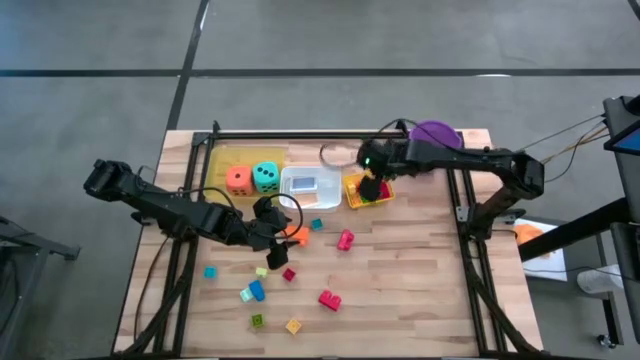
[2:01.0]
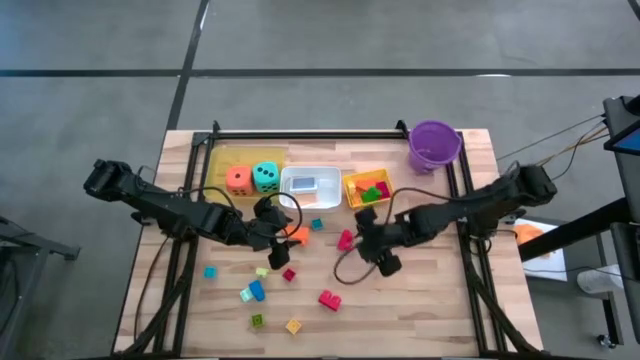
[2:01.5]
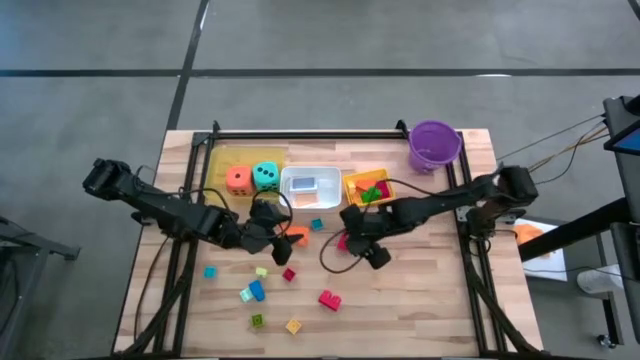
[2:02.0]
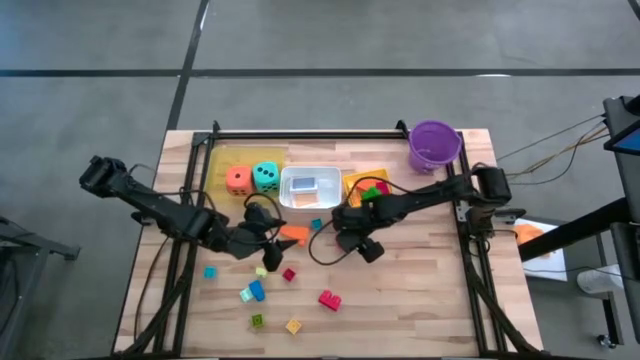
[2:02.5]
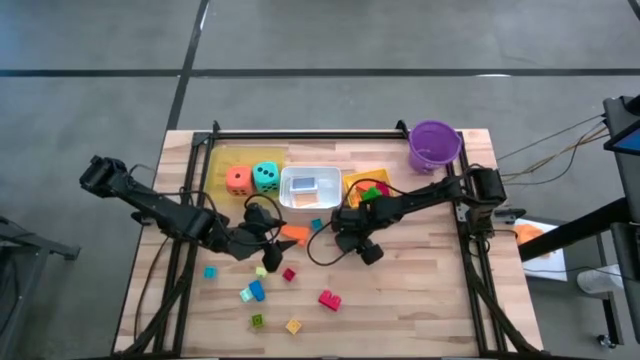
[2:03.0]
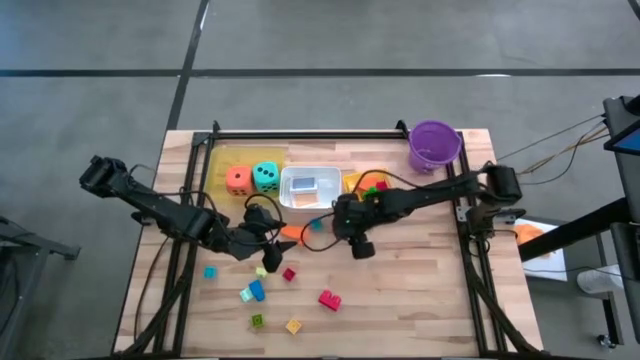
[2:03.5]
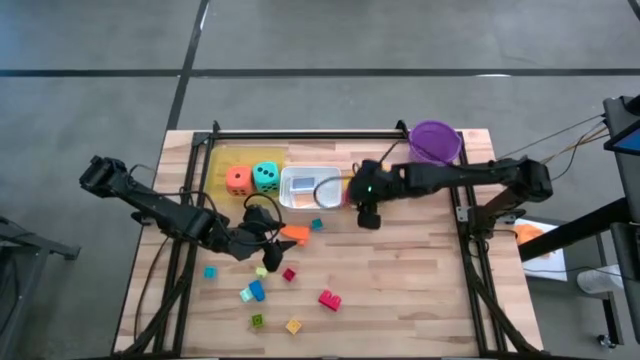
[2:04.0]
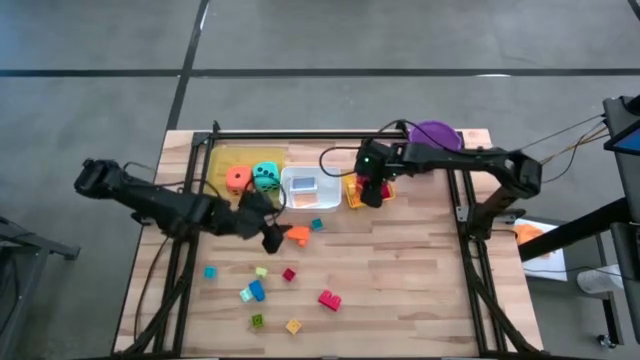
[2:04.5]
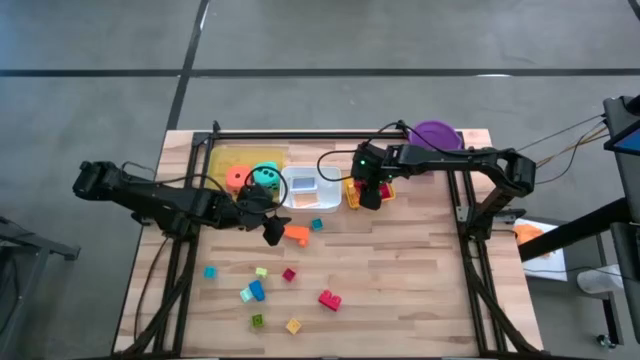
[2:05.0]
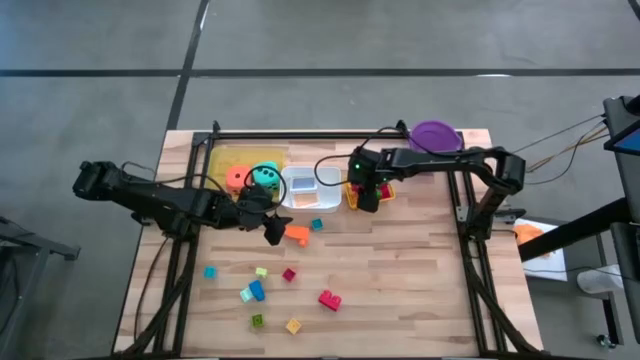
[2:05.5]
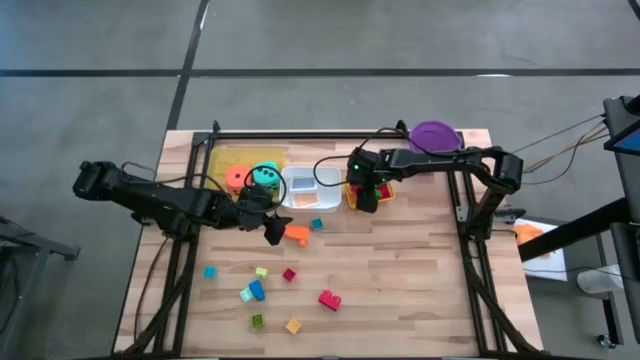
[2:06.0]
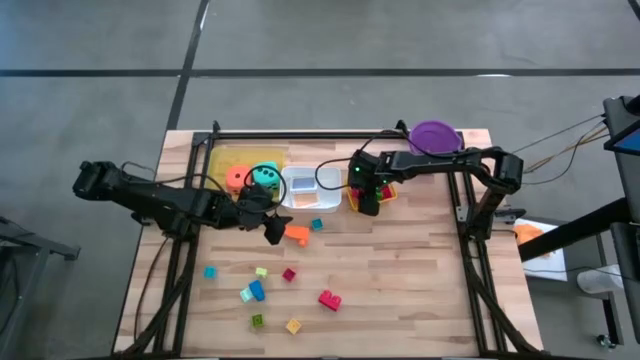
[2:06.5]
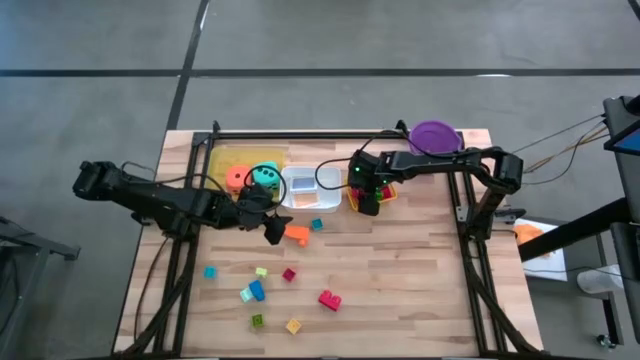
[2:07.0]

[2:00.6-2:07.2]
Task: Pick & Place Toys
Put the red game piece into the yellow bin

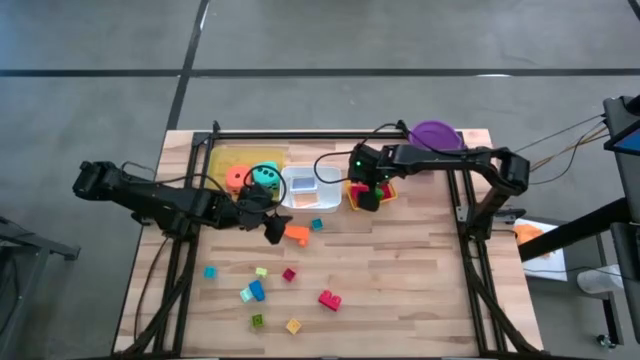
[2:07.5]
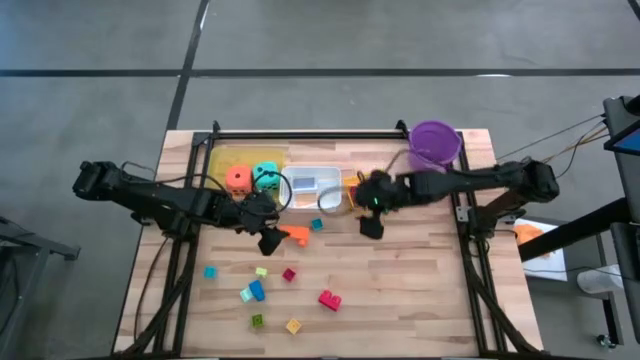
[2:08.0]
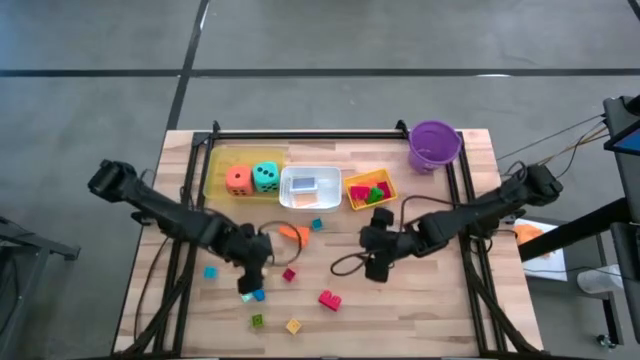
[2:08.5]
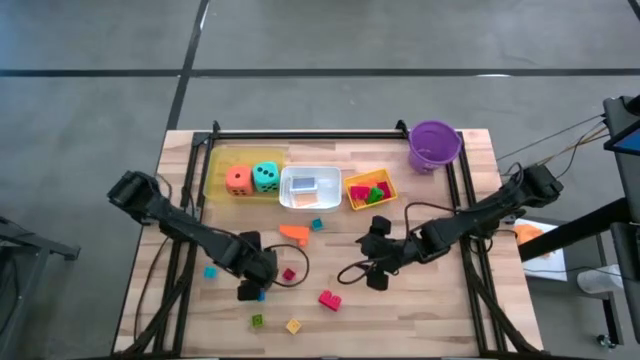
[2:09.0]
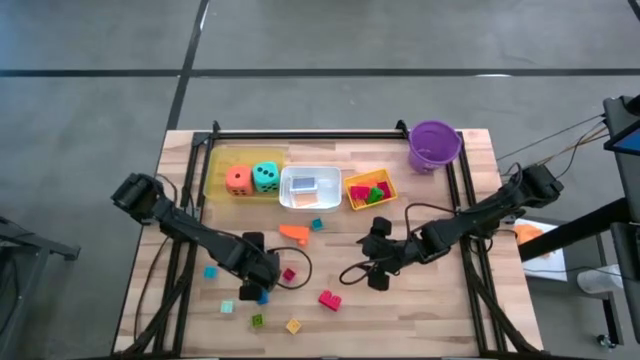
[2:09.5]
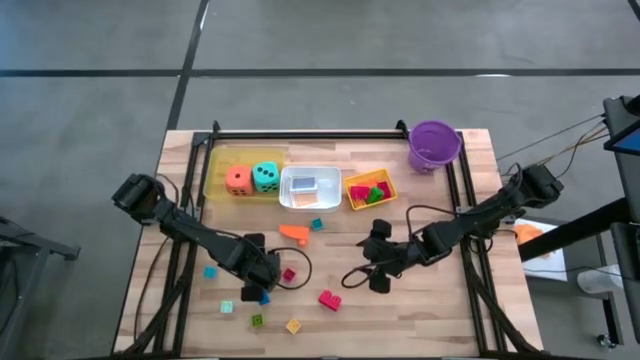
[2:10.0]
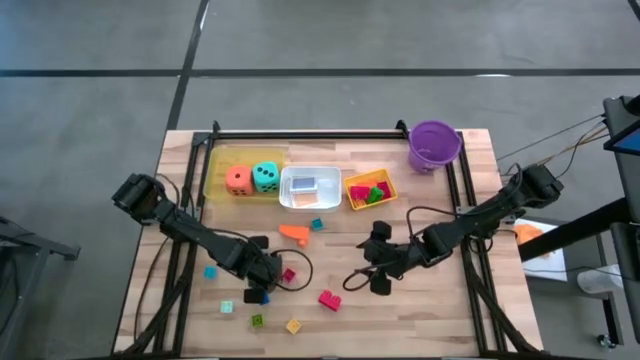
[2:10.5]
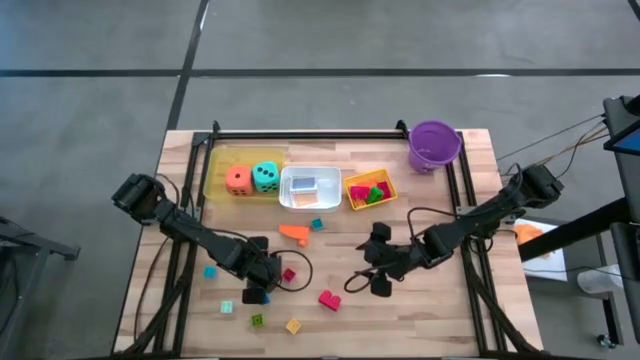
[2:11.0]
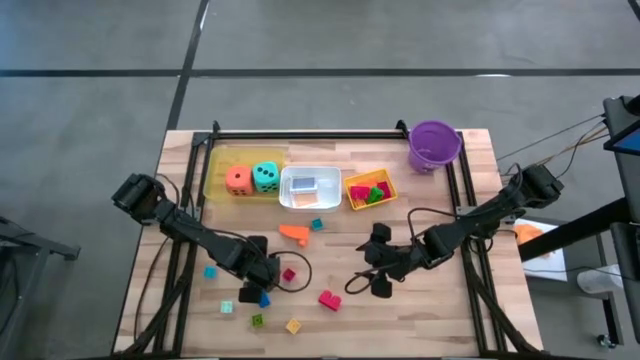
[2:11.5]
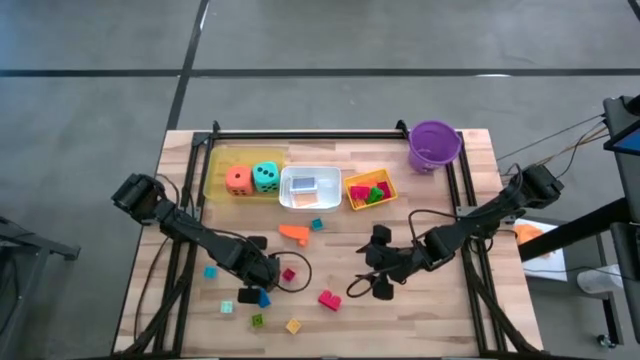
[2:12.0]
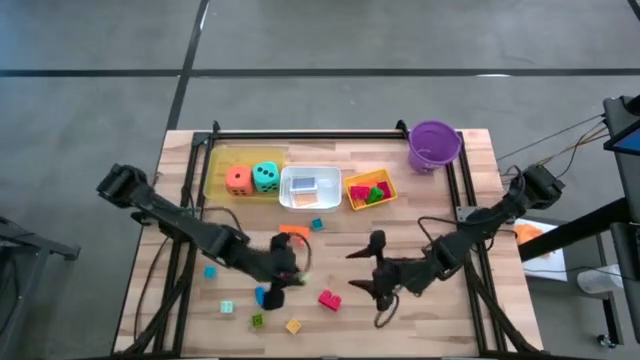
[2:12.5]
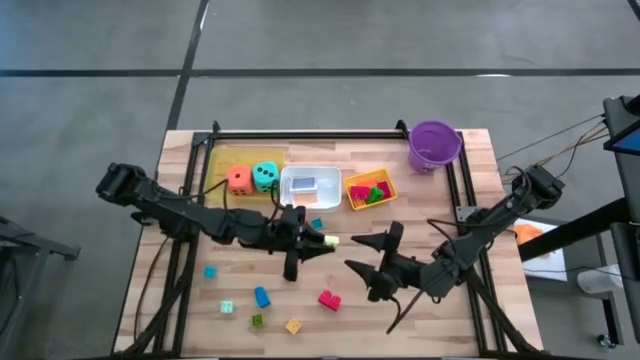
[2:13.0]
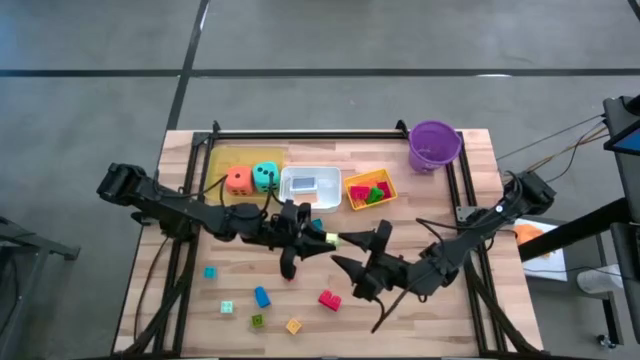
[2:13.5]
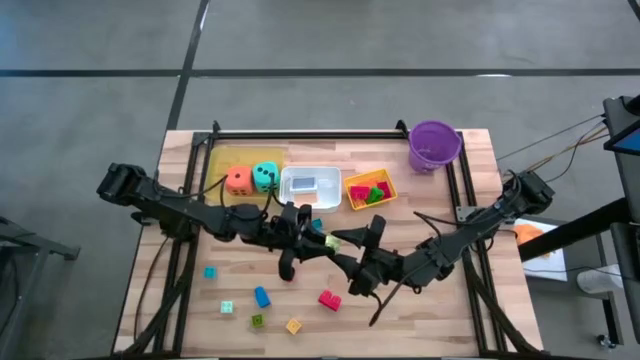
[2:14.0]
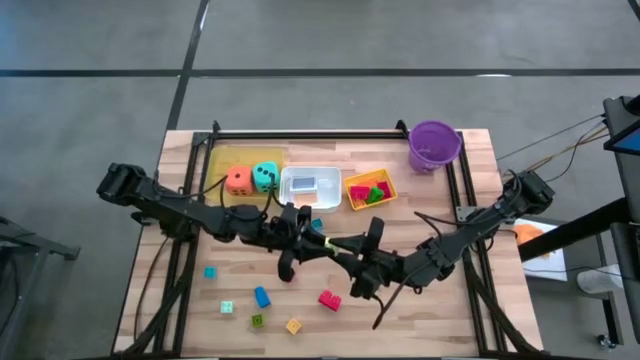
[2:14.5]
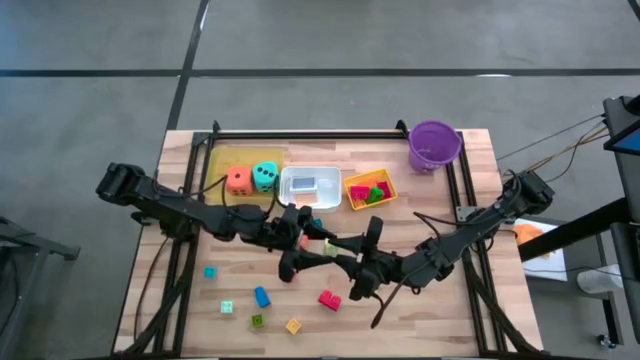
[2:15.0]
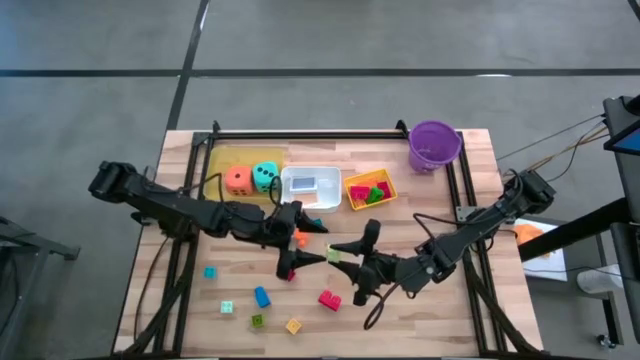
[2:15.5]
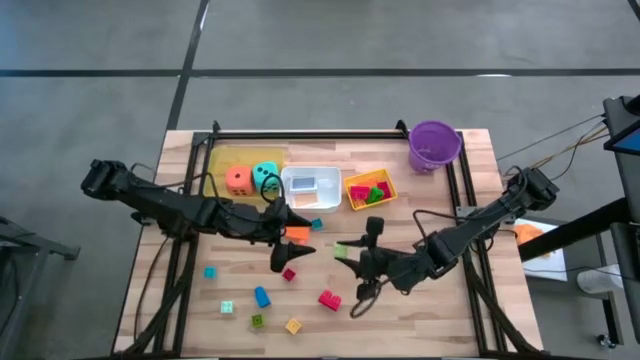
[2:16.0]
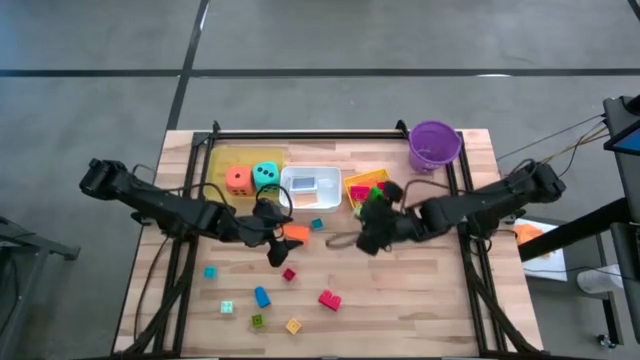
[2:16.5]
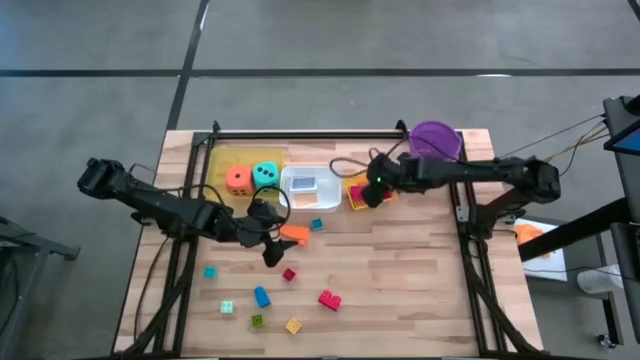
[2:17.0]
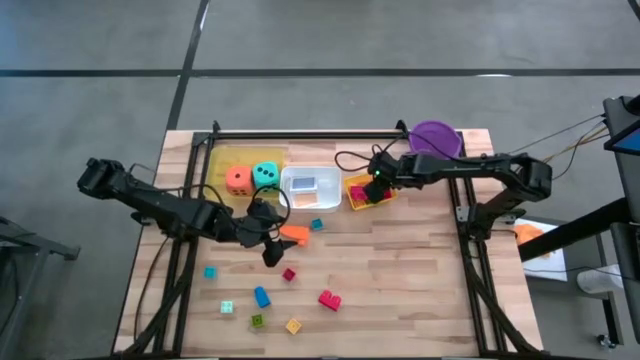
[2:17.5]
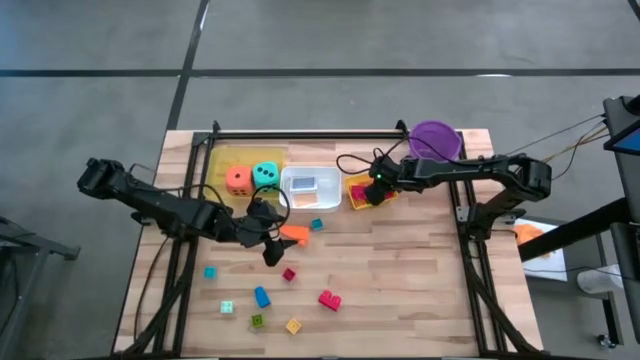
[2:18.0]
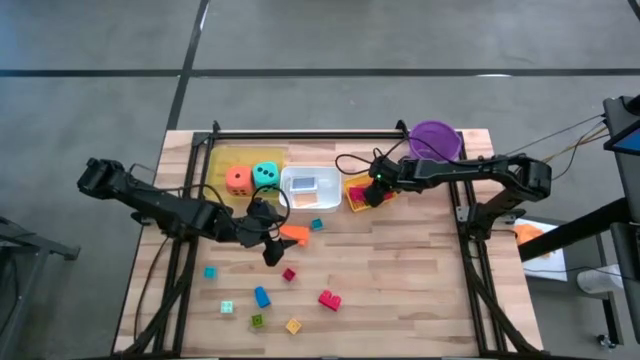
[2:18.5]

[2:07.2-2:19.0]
Put the light green game piece into the yellow bin

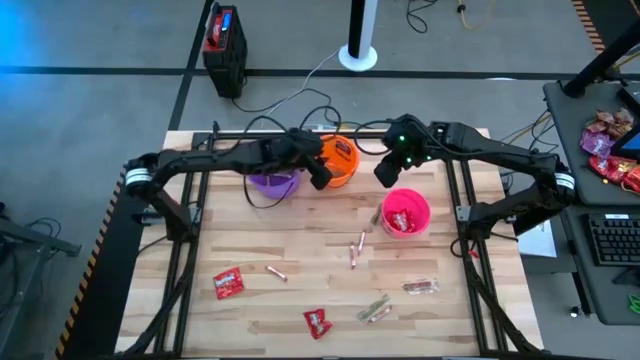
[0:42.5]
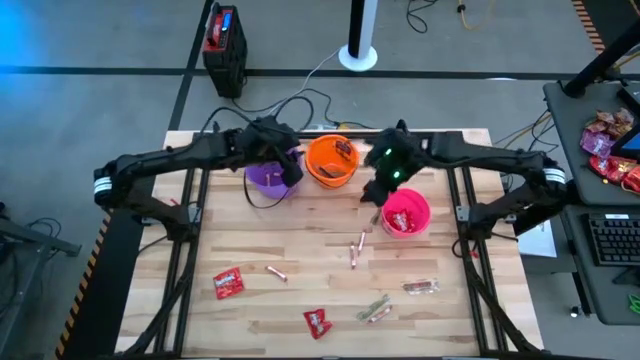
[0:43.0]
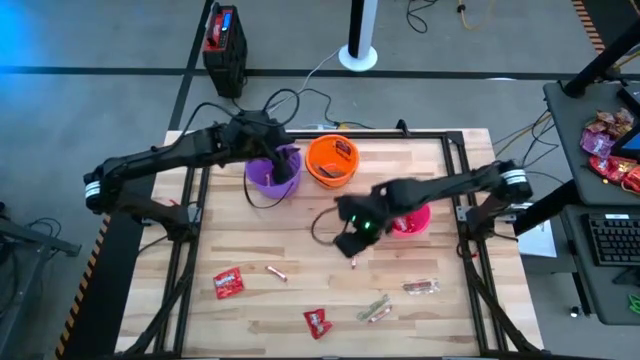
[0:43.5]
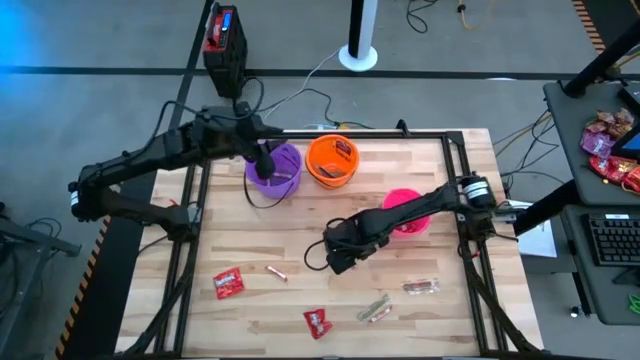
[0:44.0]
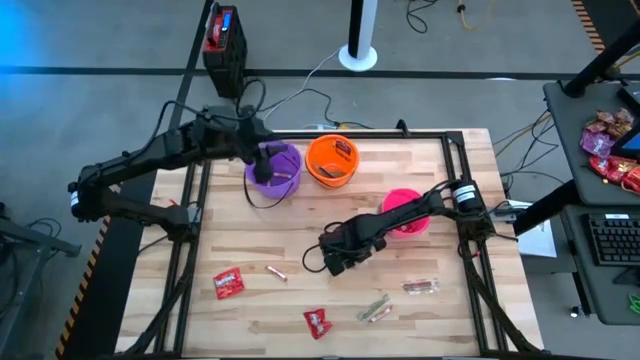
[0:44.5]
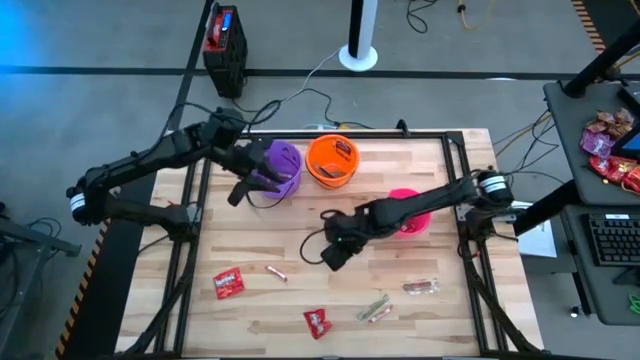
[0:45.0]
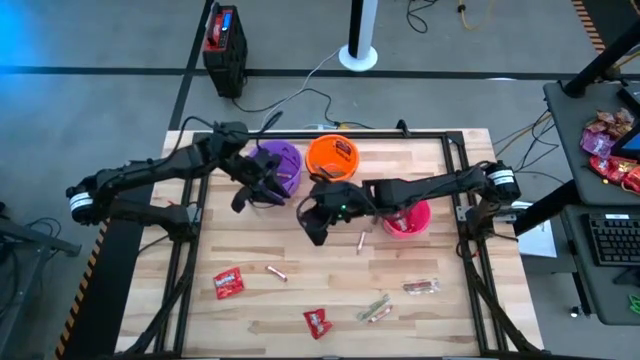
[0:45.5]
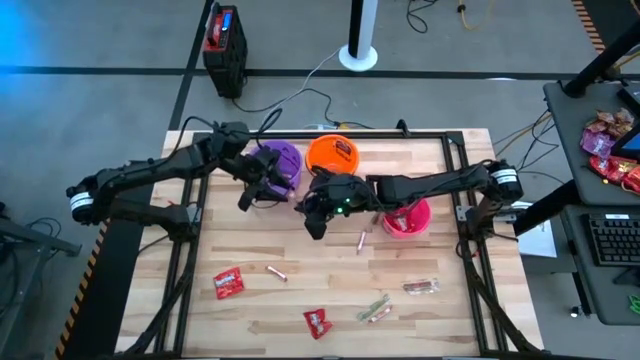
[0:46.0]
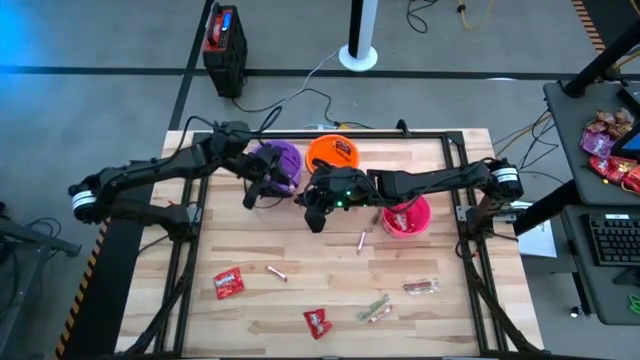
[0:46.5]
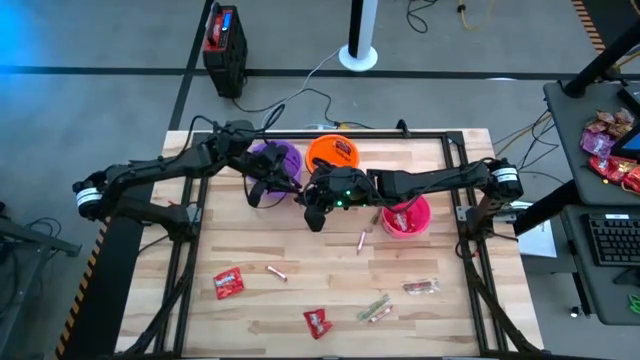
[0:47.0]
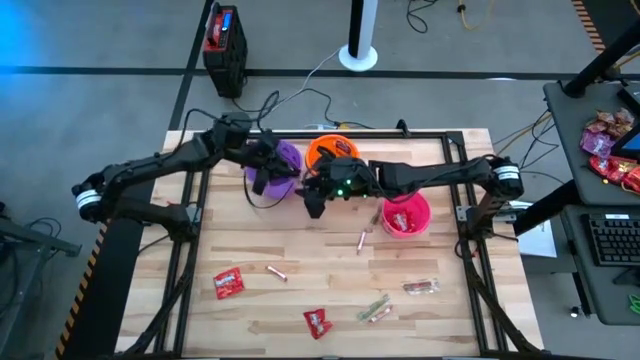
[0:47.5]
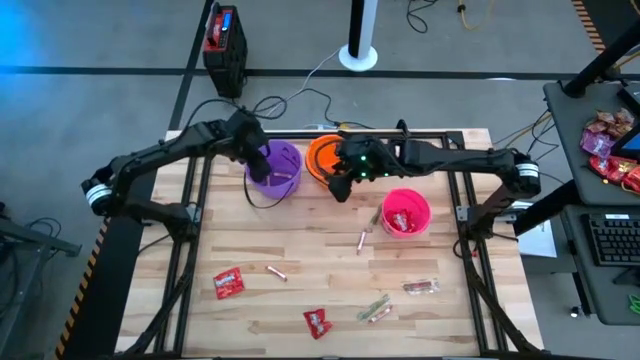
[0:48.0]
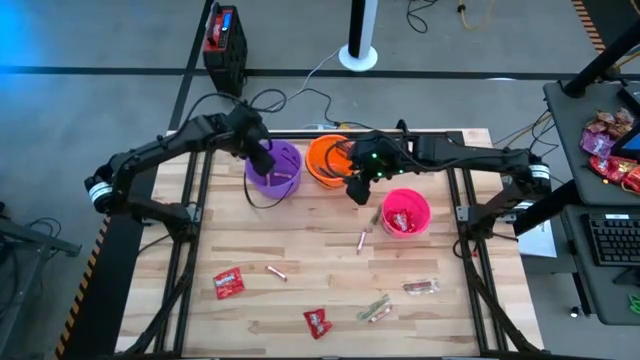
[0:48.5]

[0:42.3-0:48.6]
Task: Sort candy by brand, put in halloween buckets
Put the white candy into the violet bucket
